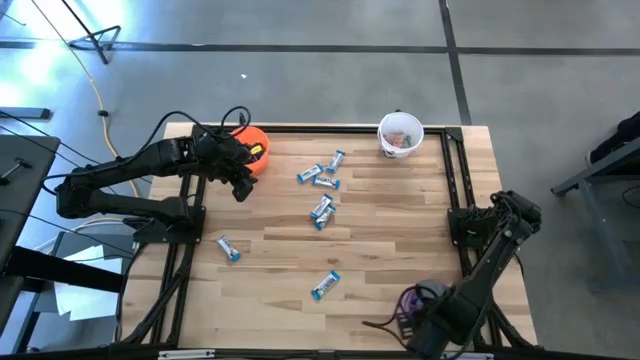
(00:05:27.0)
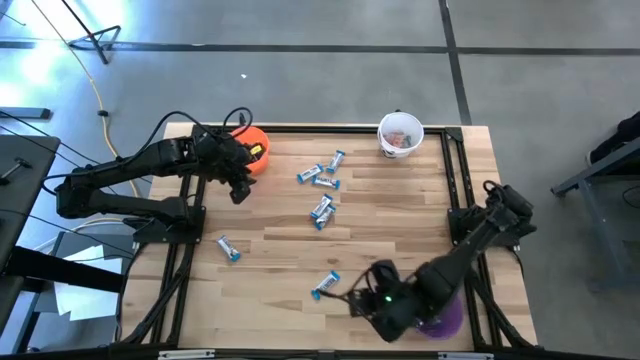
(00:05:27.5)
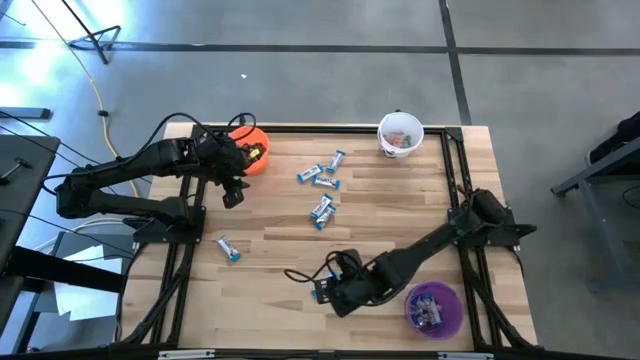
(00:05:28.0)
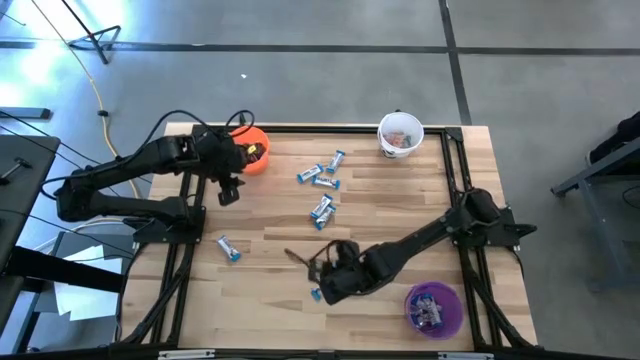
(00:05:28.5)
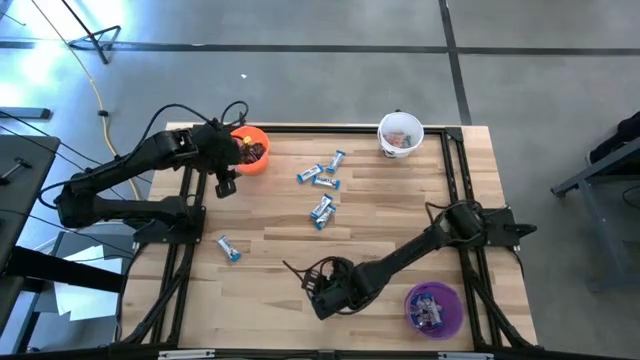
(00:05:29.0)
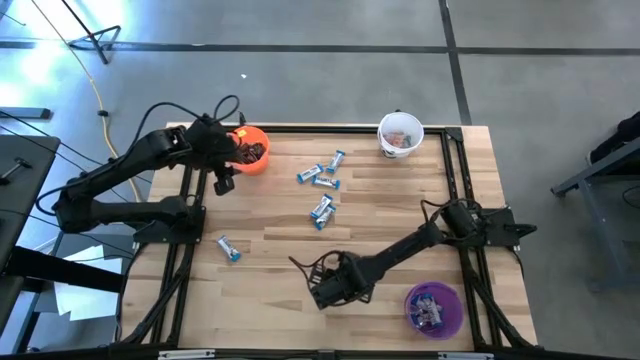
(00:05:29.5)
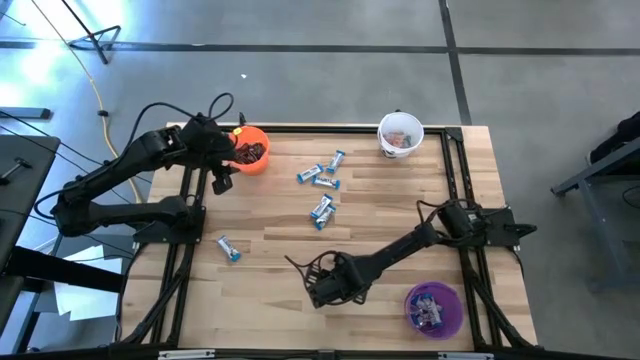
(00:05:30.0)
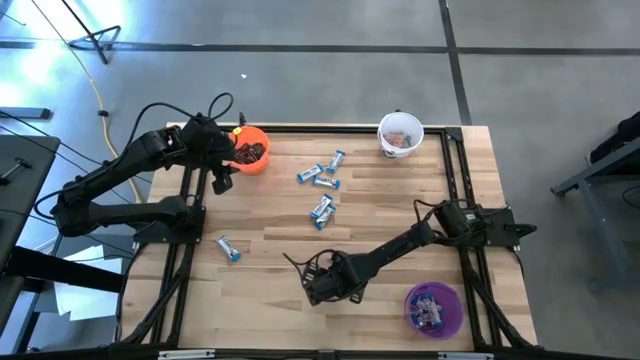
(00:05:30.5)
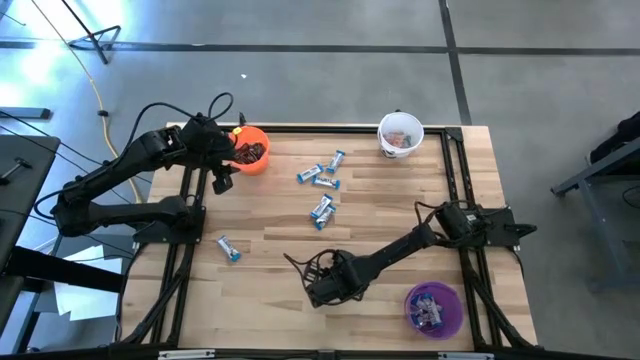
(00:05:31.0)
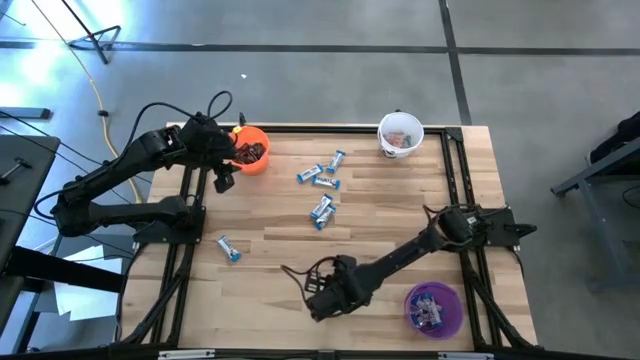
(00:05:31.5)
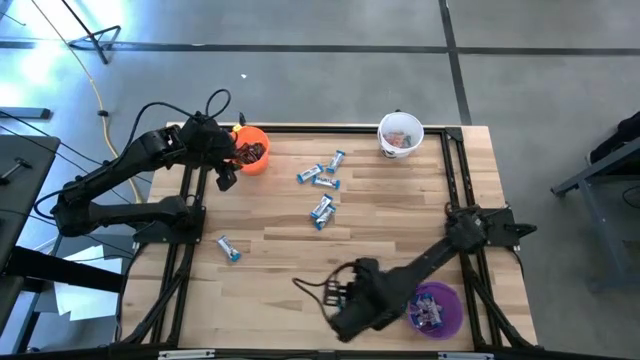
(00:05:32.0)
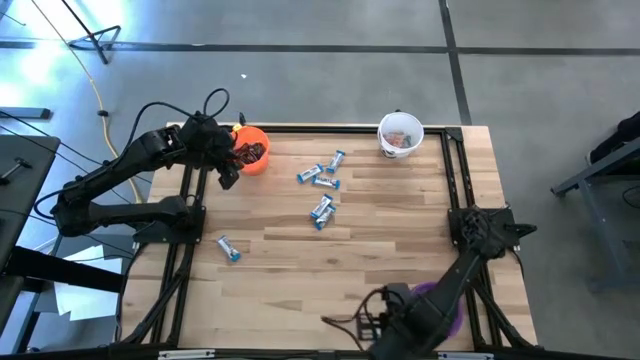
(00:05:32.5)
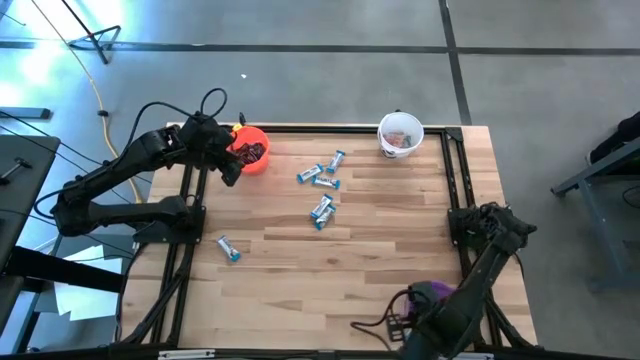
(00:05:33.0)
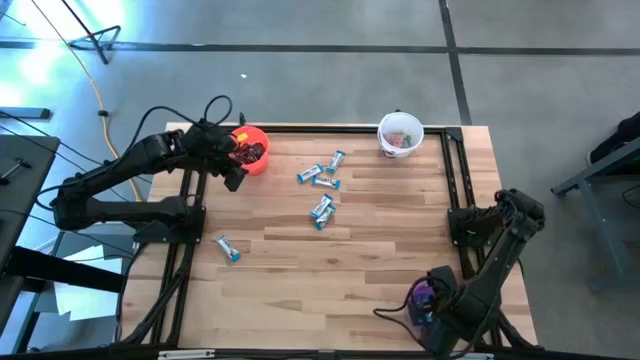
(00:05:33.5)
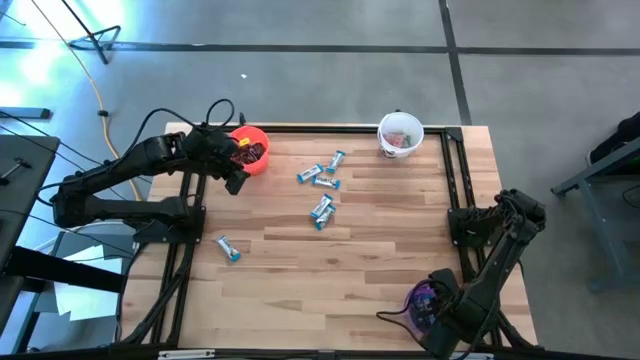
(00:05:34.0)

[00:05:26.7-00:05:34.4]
Task: Sort candy
Put the white chocolate into the violet bucket

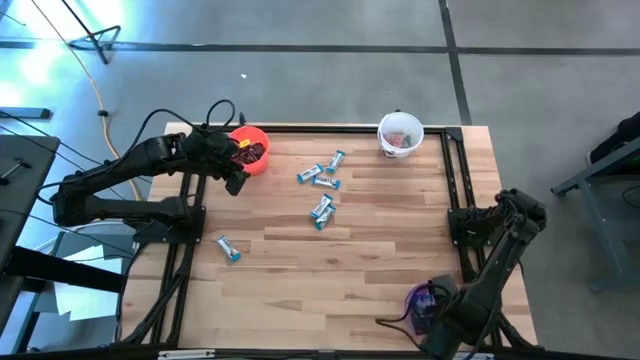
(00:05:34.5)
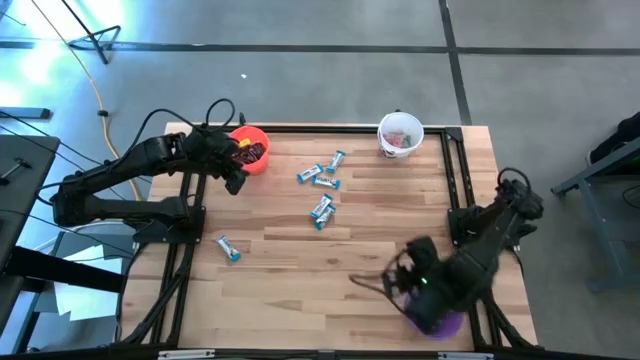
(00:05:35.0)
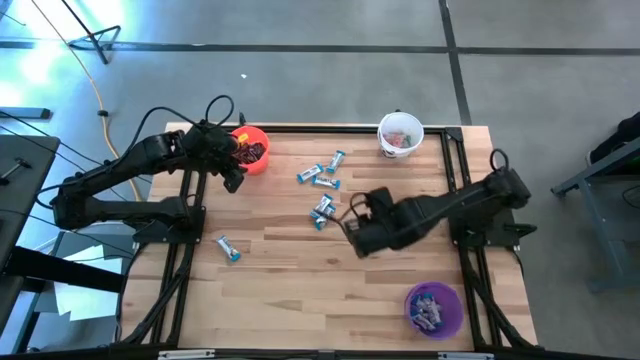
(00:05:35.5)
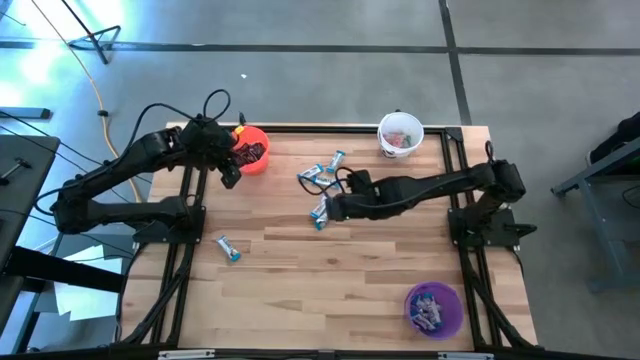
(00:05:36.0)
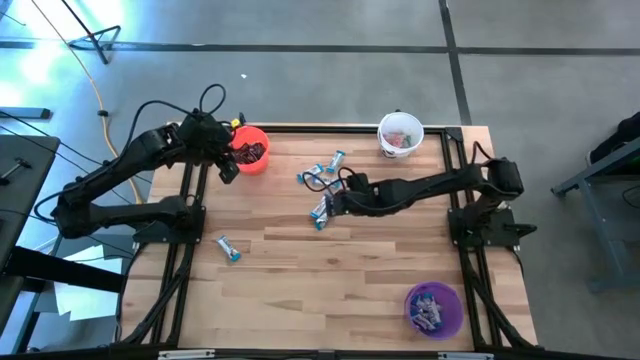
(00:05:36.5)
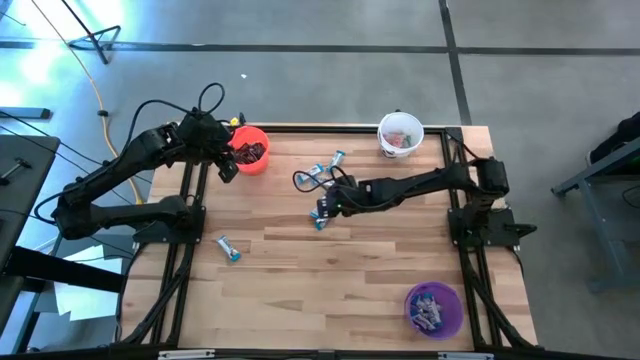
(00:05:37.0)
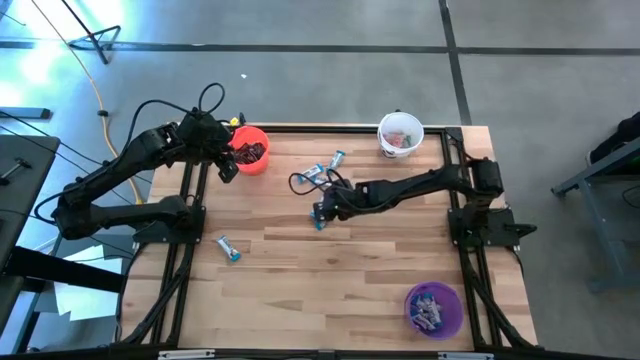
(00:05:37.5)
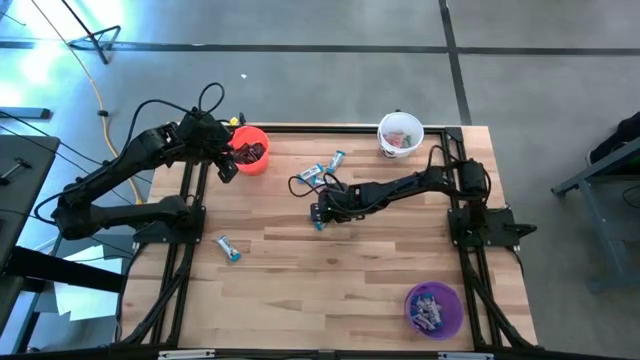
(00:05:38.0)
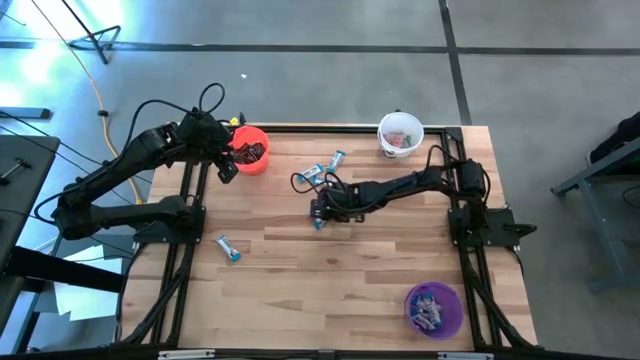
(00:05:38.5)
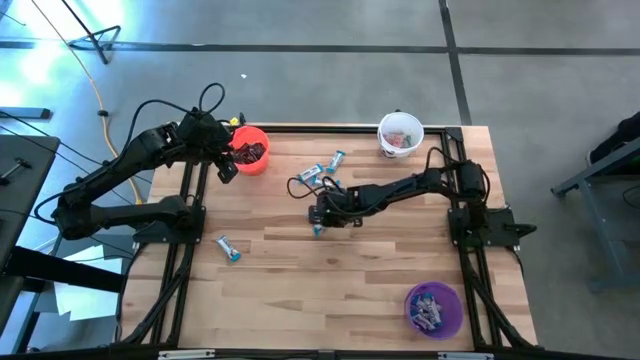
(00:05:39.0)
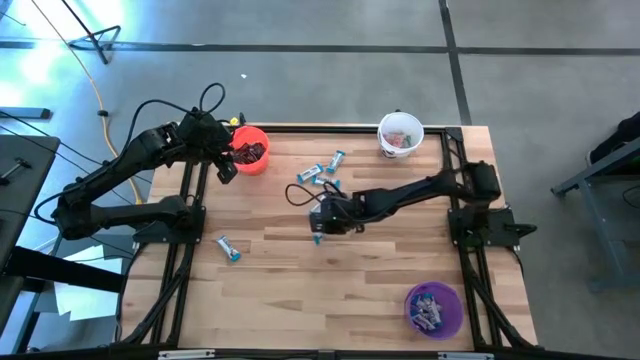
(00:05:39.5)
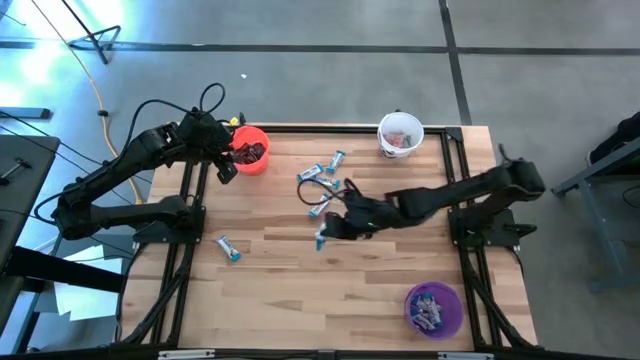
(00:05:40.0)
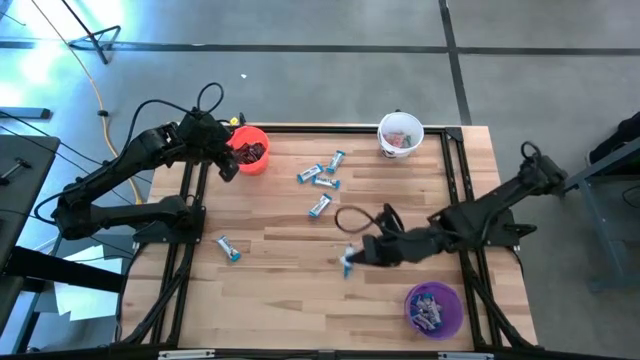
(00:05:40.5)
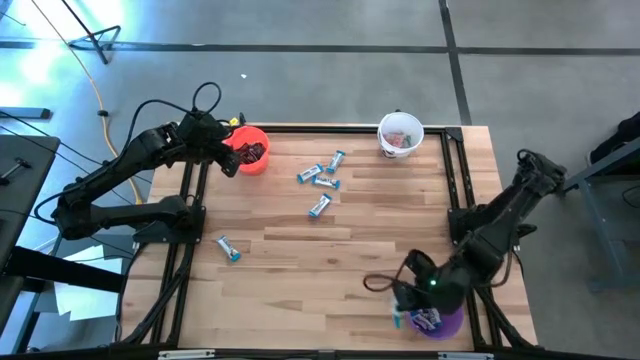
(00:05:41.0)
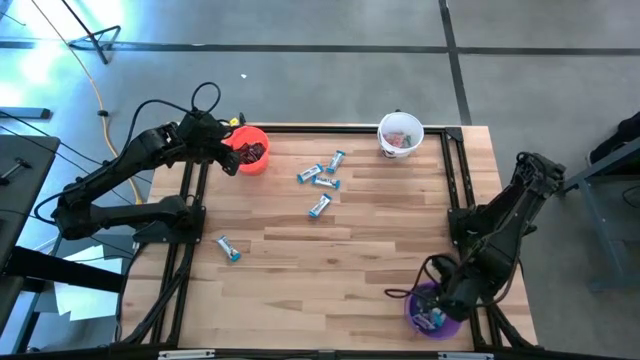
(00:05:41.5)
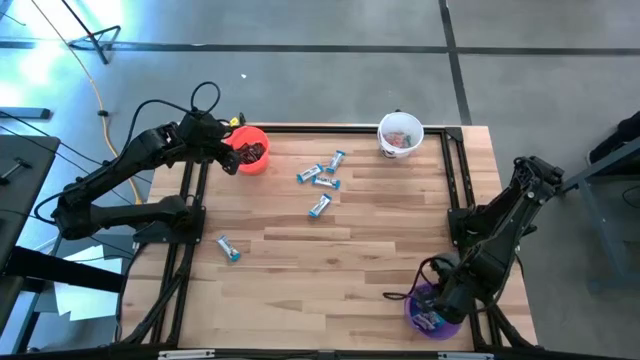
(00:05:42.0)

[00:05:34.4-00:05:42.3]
Put the white chocolate into the violet bucket

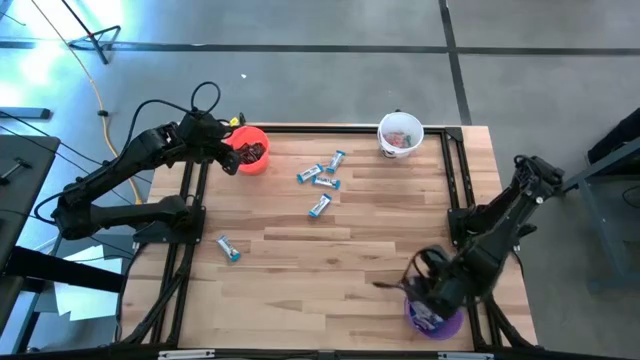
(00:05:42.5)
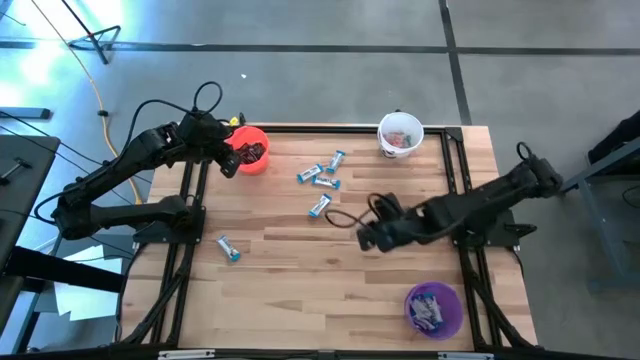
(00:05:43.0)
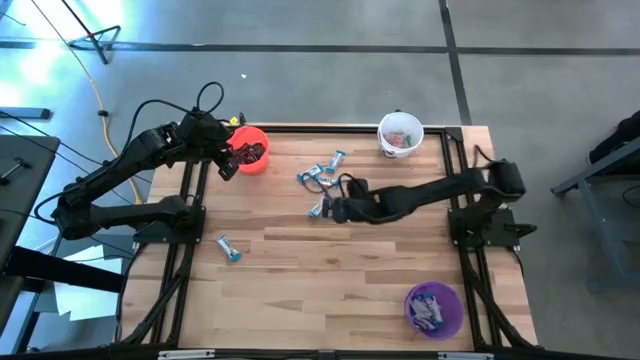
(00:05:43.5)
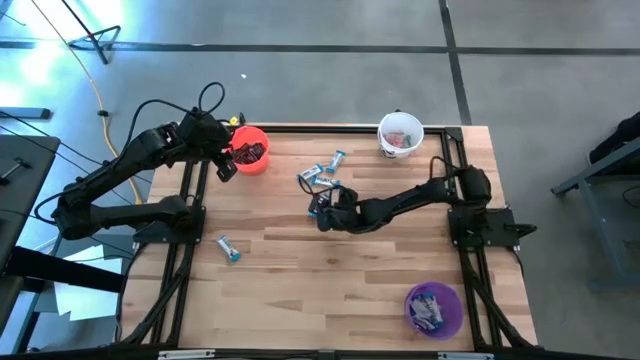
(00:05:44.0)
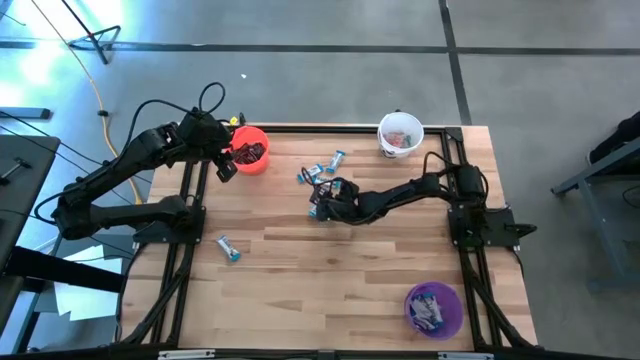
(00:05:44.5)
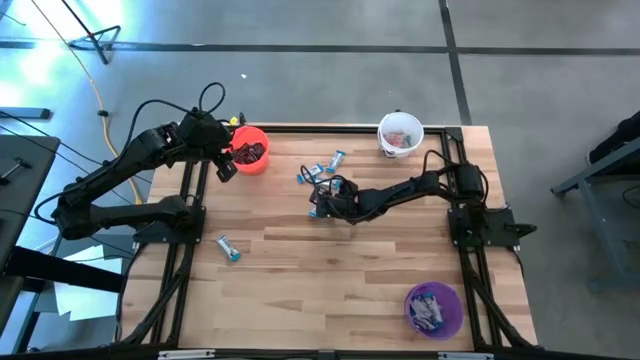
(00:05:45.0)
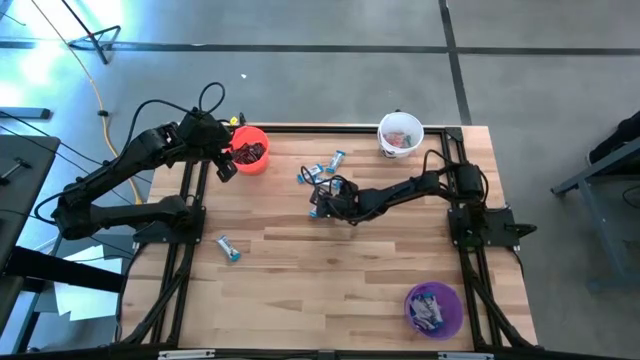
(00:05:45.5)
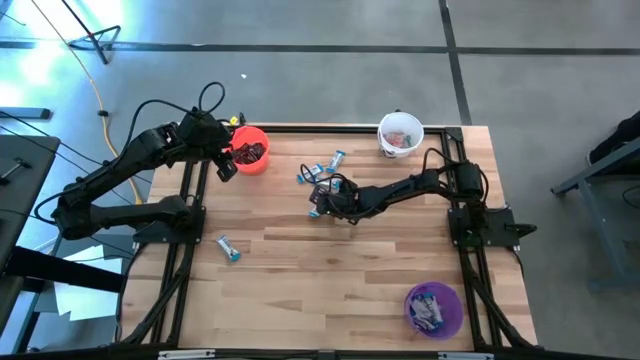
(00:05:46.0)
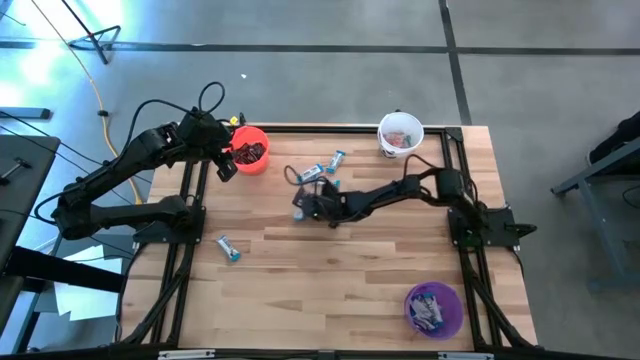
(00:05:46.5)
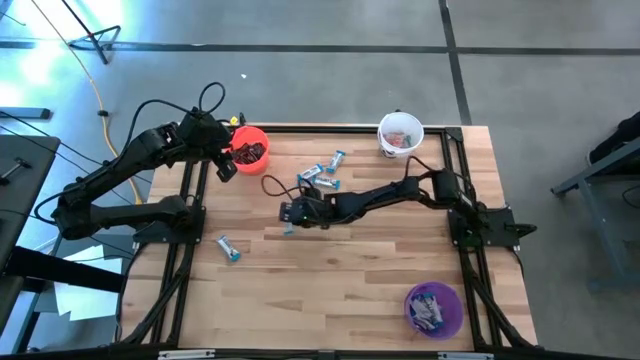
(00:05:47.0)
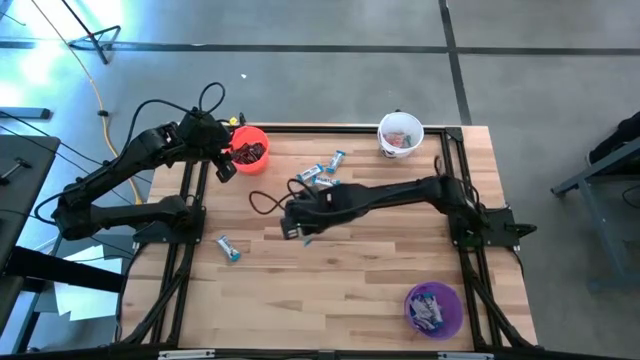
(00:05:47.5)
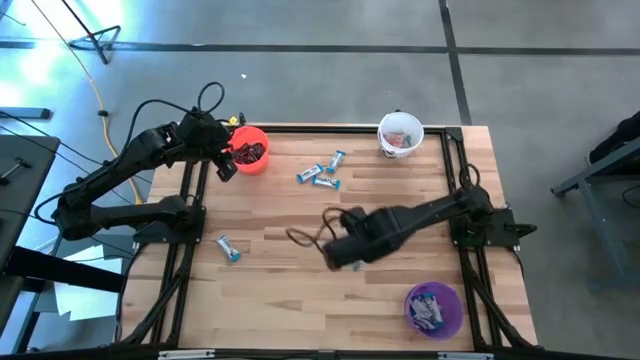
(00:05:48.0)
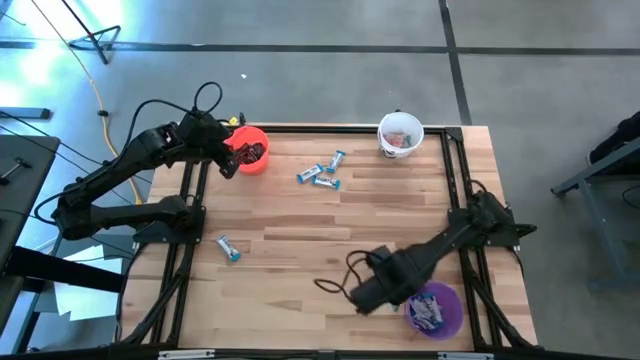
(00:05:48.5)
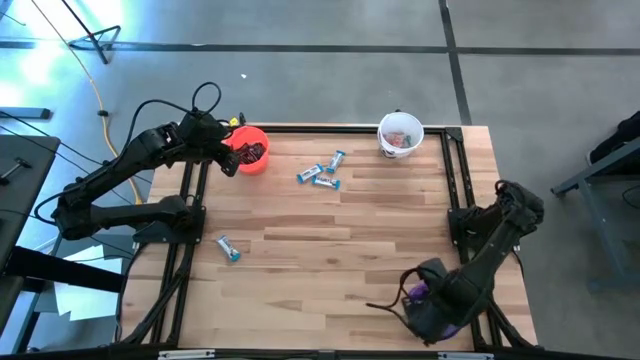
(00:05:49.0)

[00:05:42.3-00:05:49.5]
Put the white chocolate into the violet bucket
